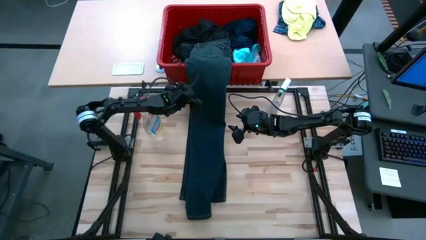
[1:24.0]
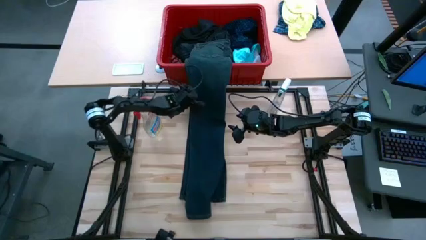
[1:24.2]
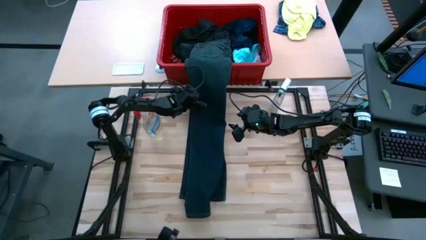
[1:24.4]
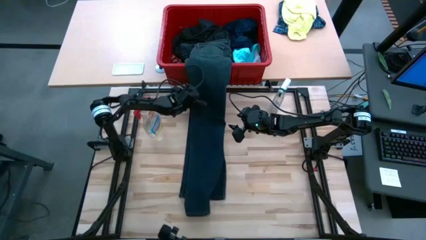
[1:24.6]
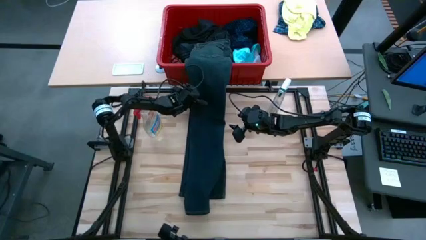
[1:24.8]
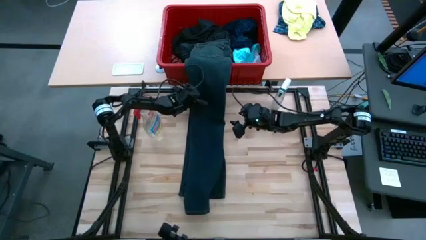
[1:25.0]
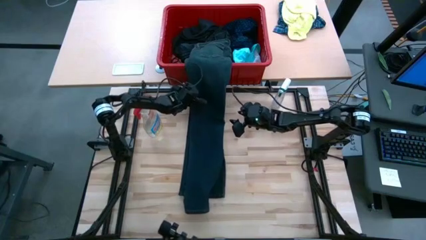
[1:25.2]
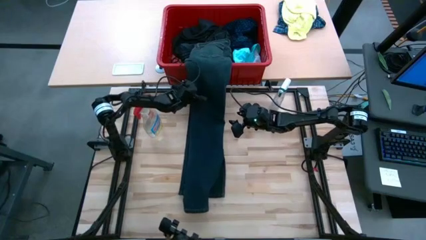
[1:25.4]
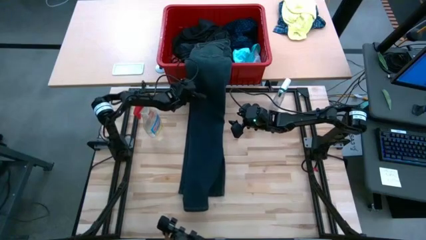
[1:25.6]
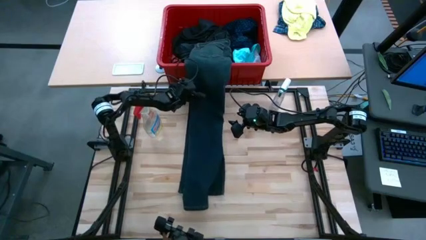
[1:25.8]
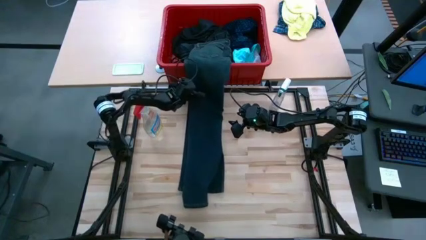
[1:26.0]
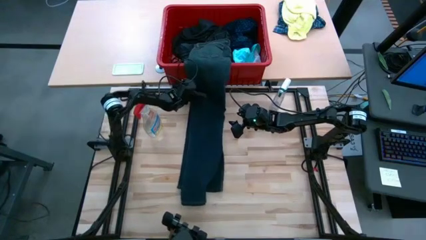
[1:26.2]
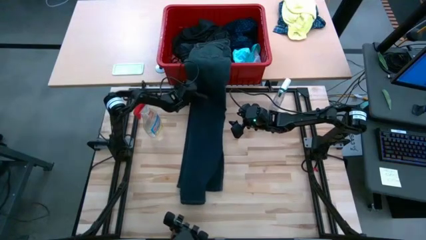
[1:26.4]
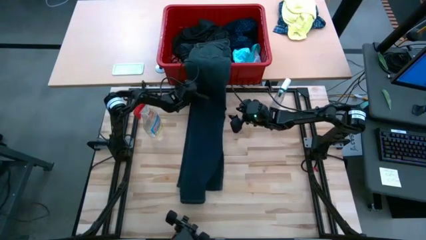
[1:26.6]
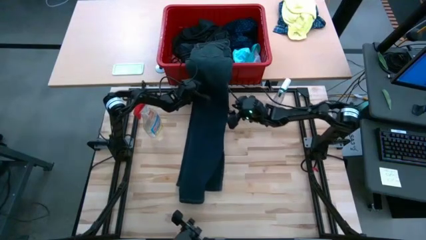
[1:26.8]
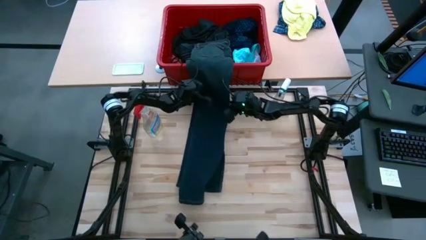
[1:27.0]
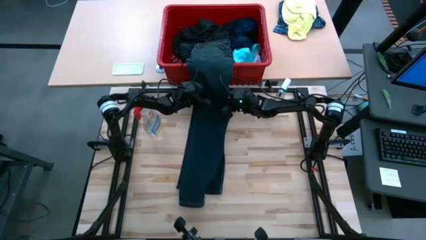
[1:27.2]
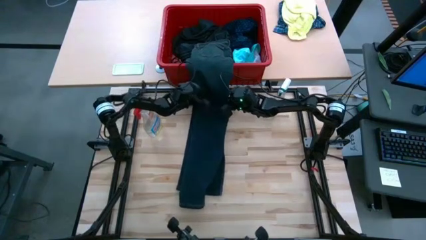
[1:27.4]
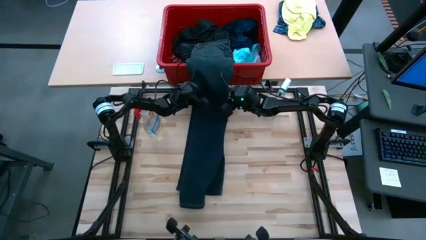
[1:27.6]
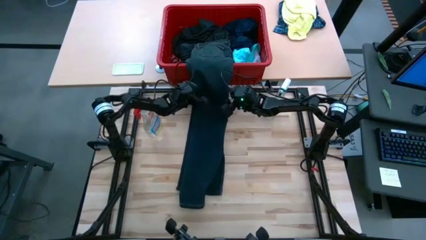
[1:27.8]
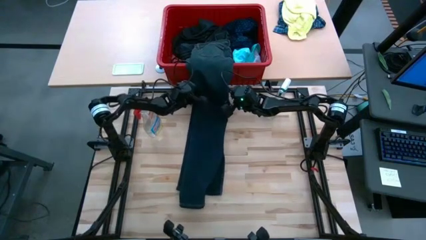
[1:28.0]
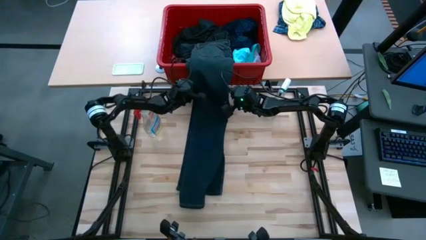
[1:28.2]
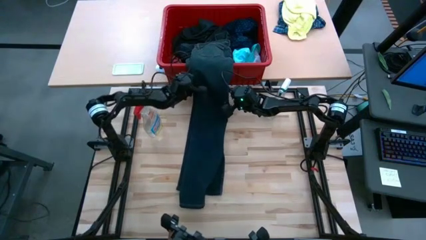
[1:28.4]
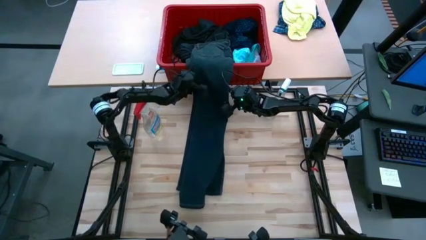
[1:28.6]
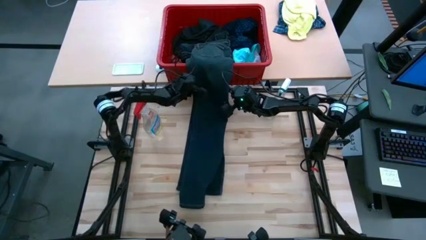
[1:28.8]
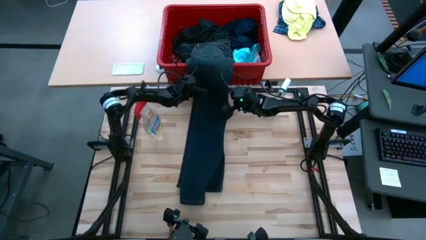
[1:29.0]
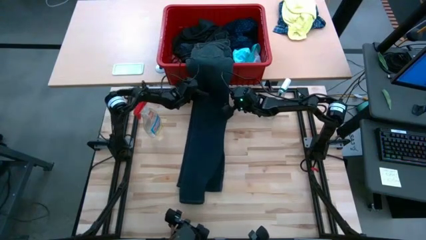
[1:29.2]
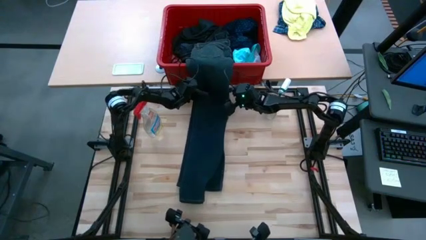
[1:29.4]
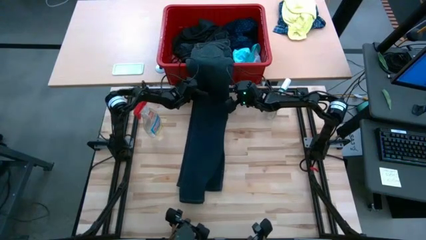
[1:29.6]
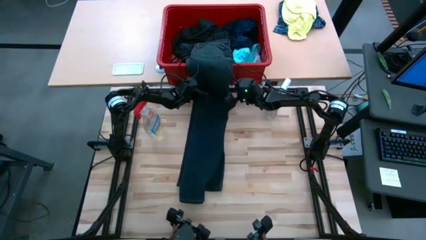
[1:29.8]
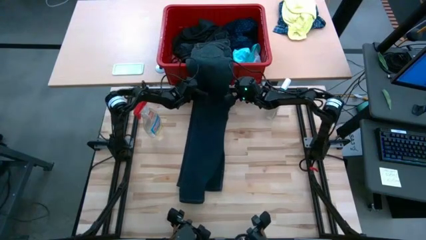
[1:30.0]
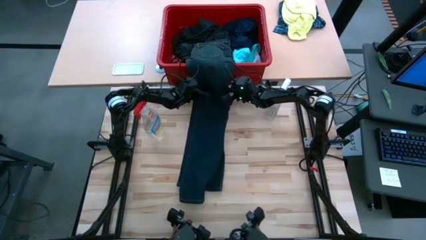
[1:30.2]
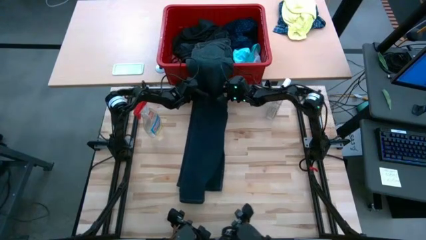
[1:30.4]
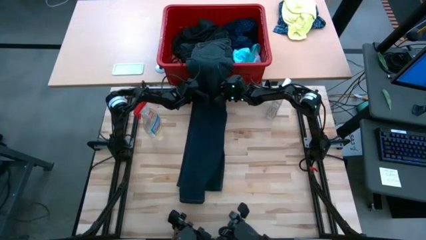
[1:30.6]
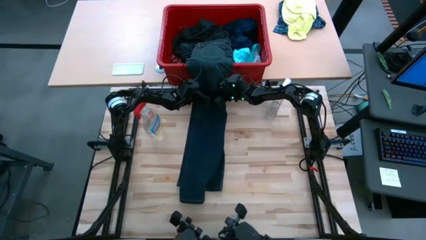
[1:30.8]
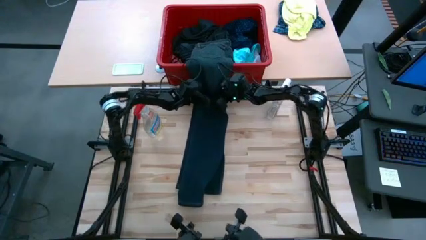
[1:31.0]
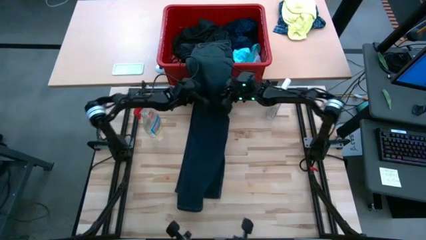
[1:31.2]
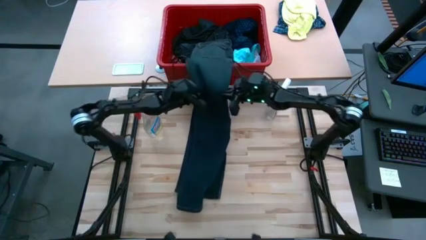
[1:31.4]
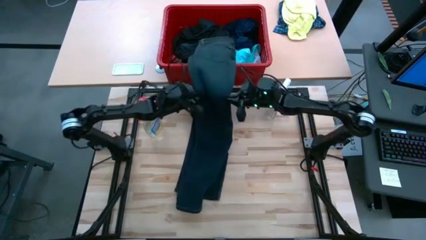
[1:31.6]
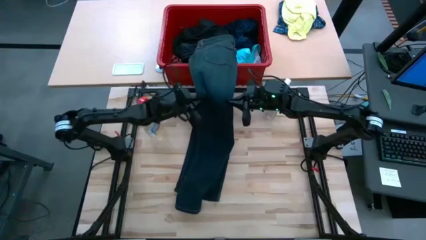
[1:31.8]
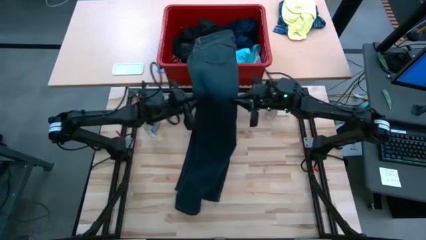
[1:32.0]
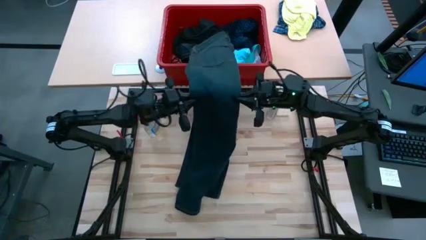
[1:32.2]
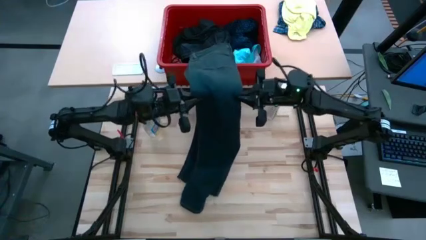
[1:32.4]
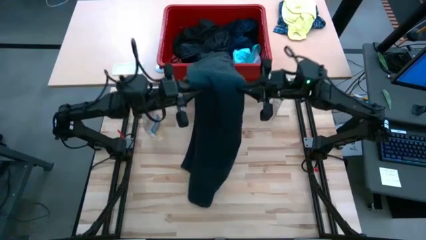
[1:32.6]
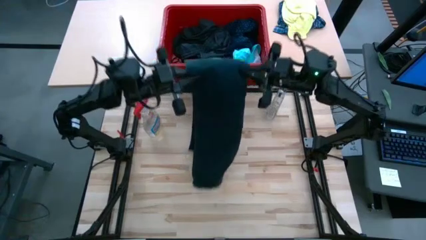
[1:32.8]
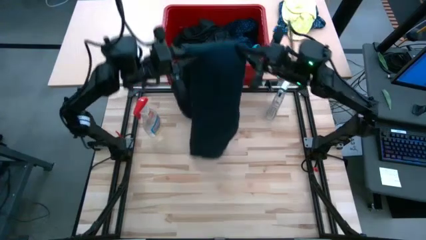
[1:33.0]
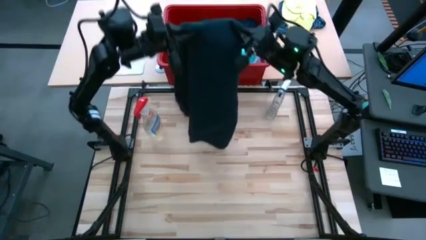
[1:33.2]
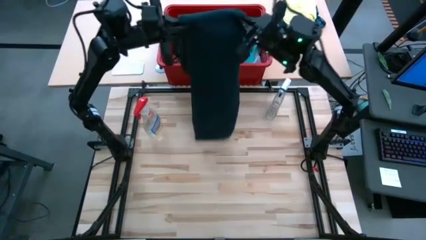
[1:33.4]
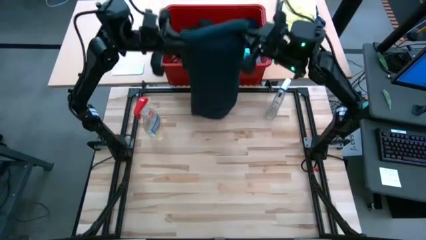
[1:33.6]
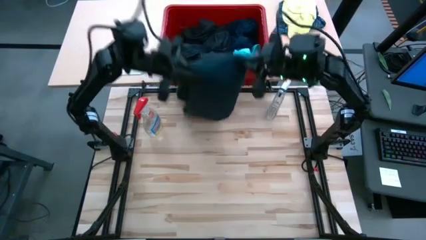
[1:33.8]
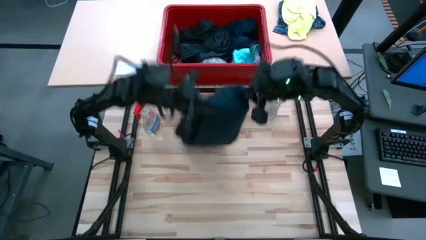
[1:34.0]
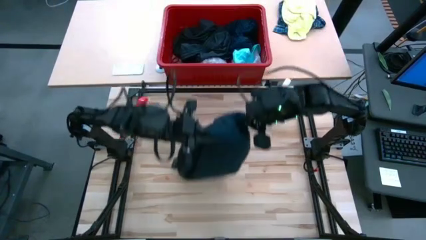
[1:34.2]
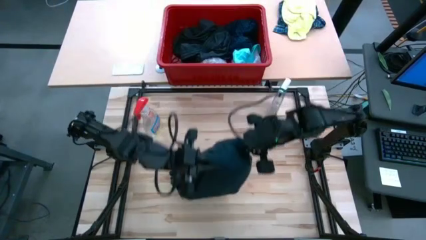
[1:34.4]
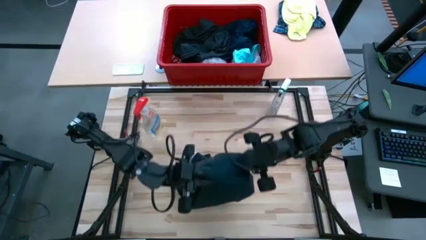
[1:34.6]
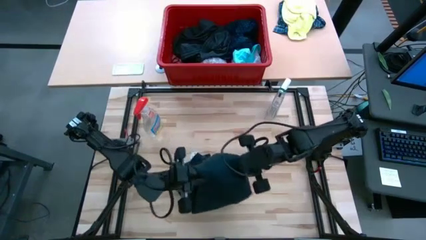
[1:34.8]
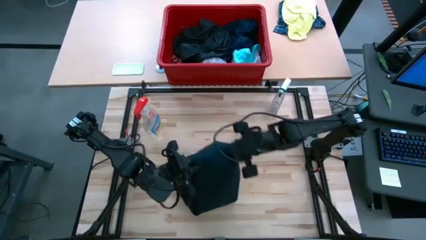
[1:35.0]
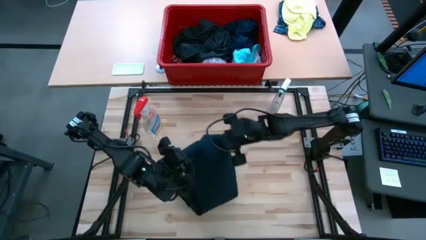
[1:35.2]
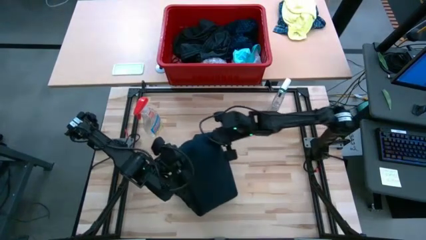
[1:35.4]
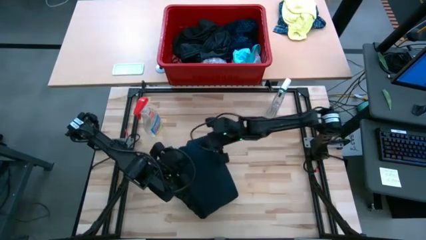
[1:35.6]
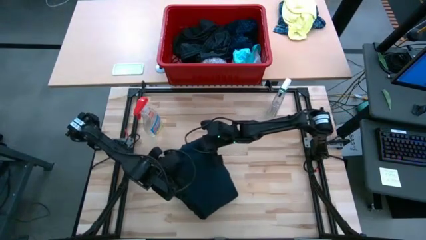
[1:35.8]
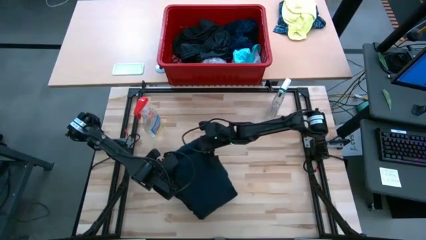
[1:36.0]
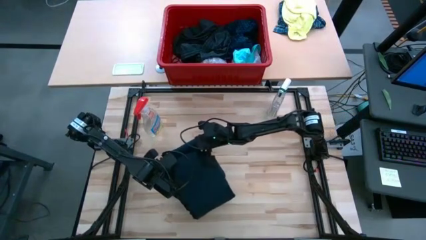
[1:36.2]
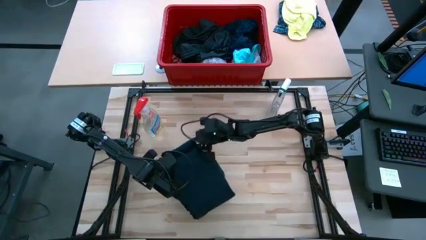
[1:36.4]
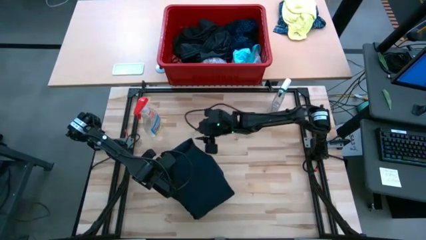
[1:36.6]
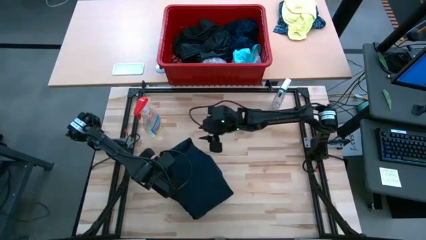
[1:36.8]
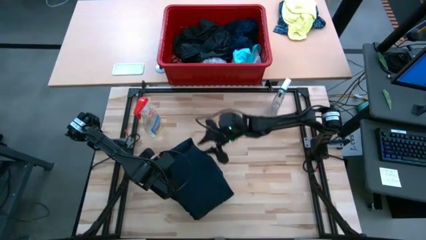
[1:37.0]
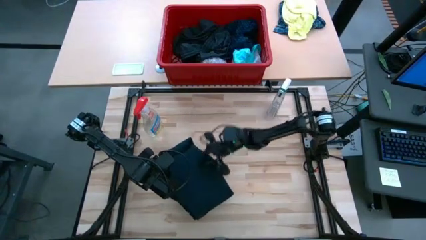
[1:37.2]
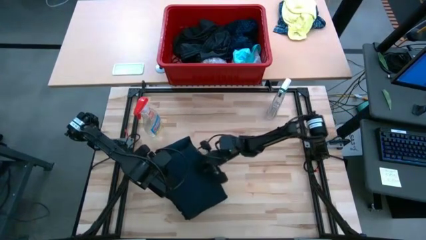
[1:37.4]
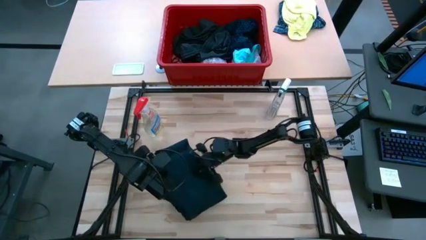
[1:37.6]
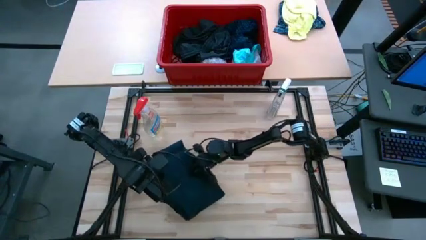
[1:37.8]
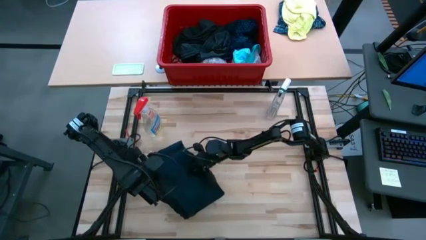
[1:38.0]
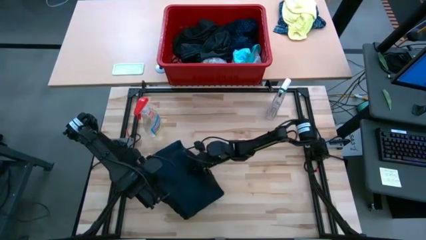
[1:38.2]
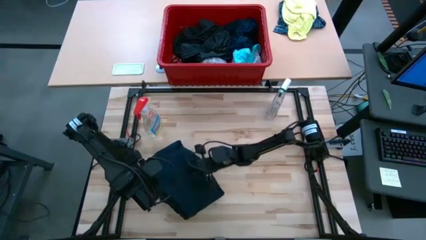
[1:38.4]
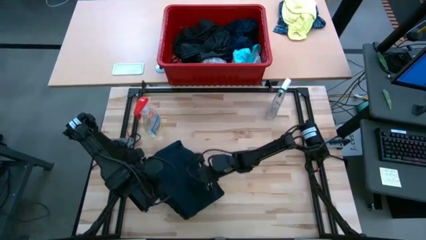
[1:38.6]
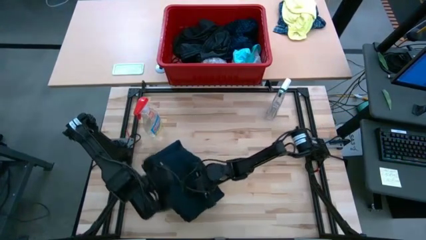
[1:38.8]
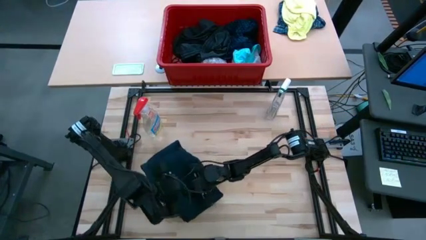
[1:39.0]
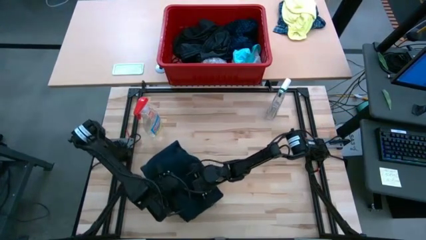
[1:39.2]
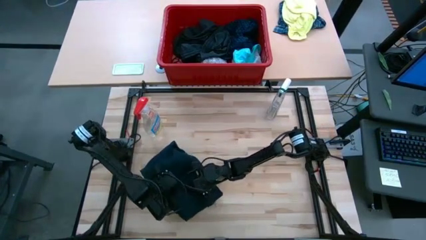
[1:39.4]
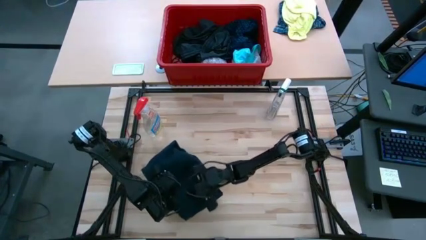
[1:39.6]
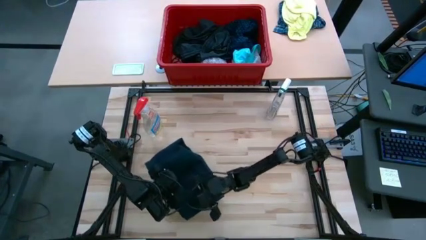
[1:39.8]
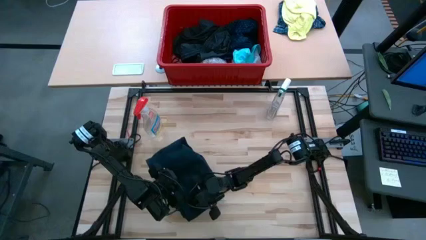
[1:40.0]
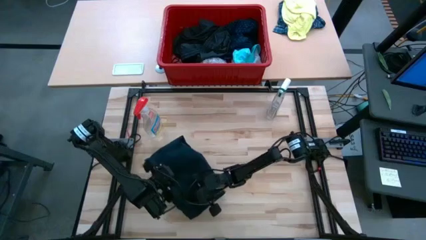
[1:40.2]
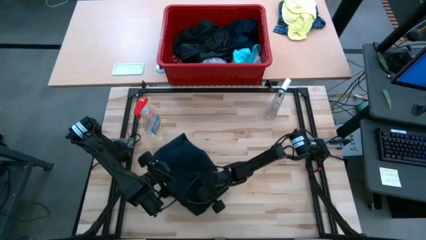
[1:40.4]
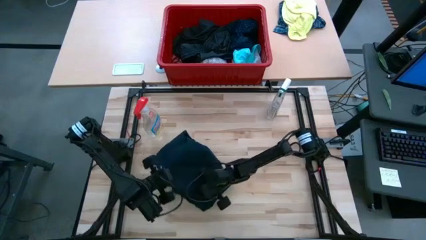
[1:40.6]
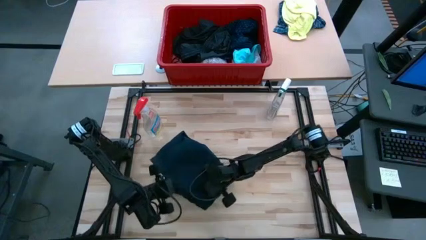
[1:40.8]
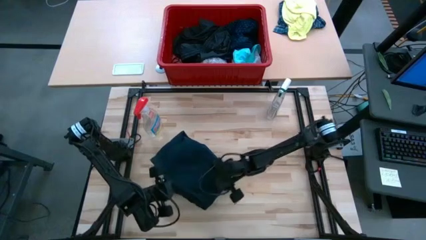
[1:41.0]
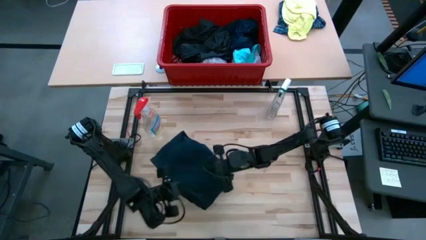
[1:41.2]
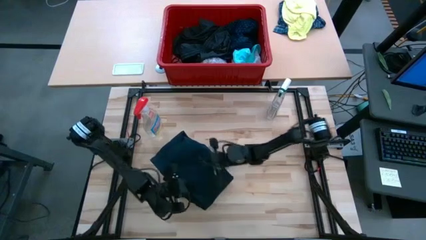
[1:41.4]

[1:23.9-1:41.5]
Task: Fold Laundry from Bin
Fold the blue pants
